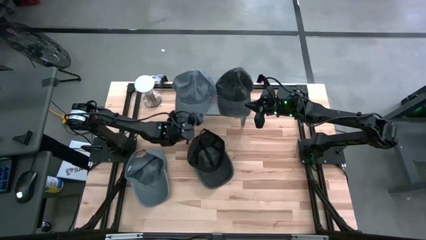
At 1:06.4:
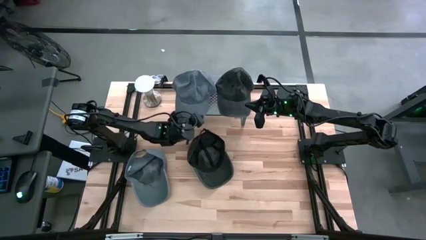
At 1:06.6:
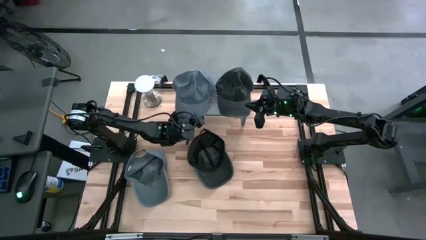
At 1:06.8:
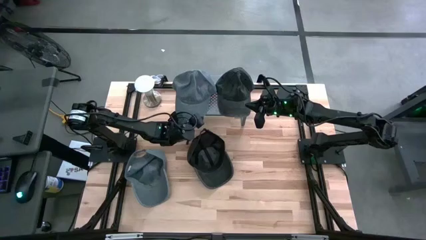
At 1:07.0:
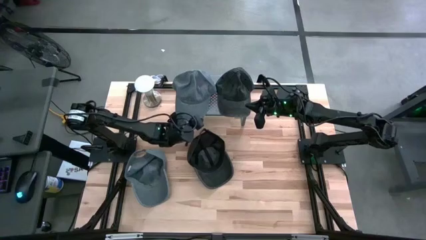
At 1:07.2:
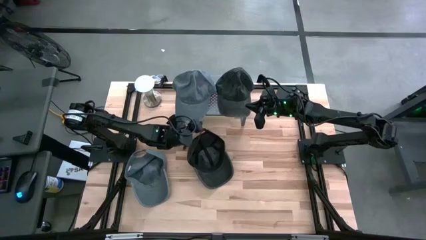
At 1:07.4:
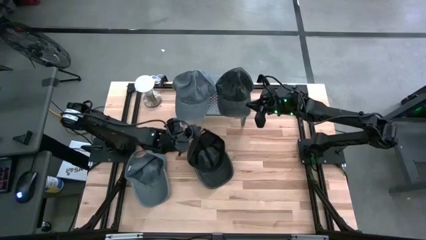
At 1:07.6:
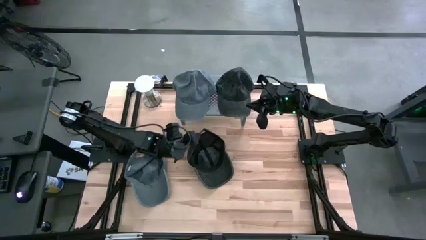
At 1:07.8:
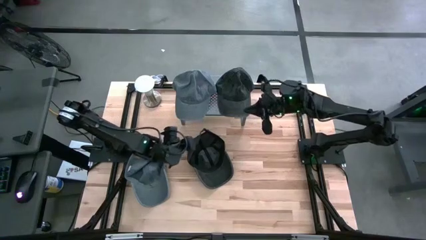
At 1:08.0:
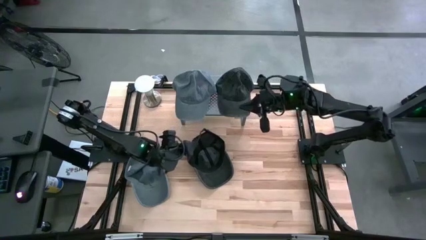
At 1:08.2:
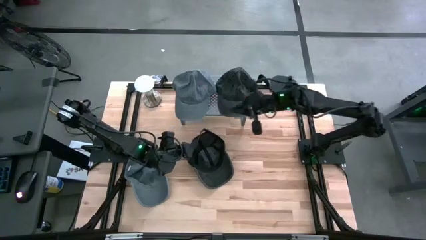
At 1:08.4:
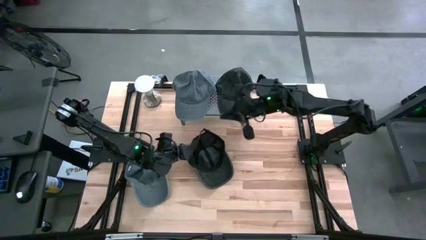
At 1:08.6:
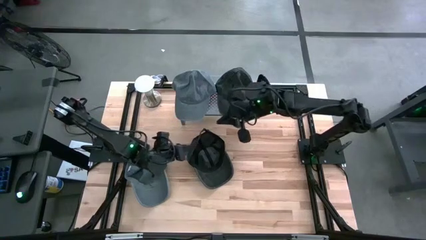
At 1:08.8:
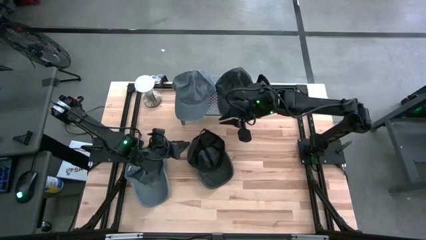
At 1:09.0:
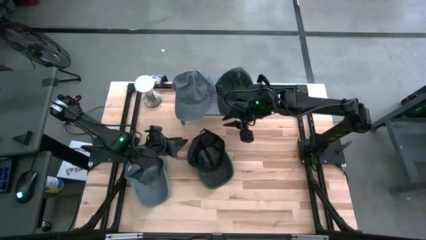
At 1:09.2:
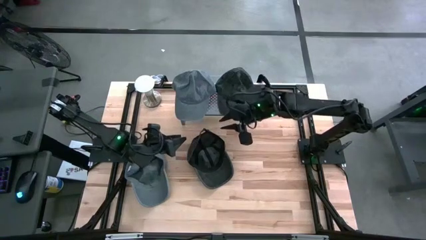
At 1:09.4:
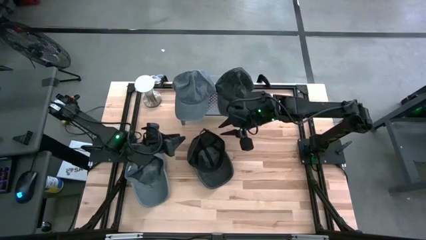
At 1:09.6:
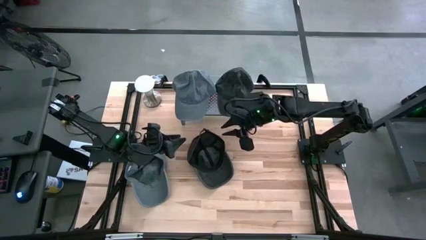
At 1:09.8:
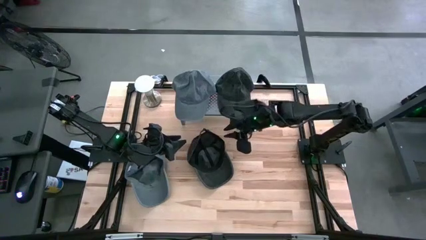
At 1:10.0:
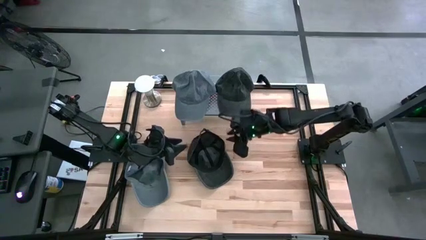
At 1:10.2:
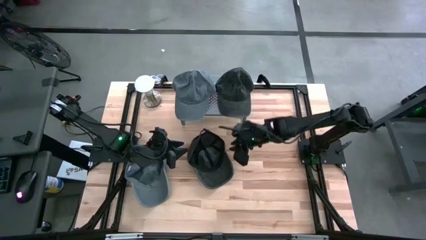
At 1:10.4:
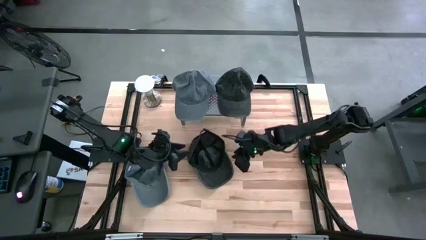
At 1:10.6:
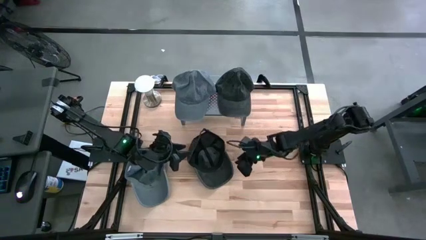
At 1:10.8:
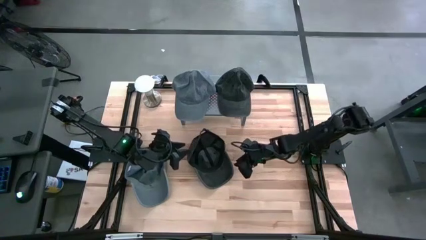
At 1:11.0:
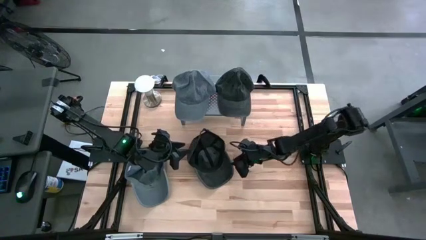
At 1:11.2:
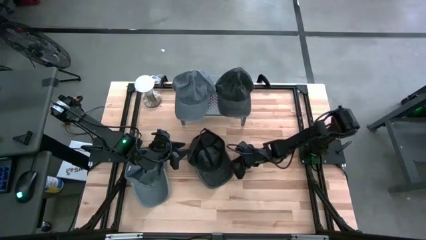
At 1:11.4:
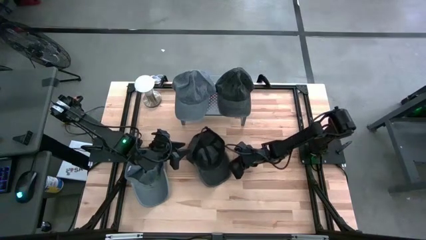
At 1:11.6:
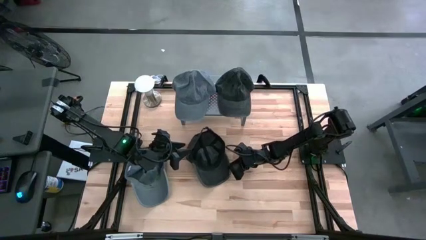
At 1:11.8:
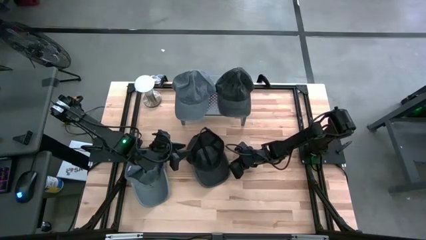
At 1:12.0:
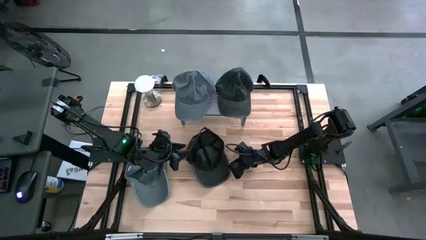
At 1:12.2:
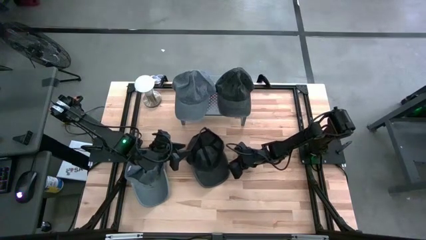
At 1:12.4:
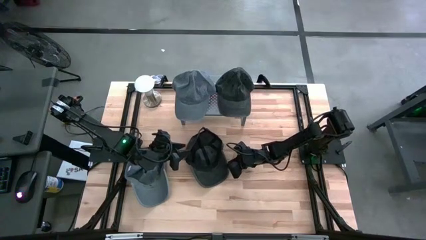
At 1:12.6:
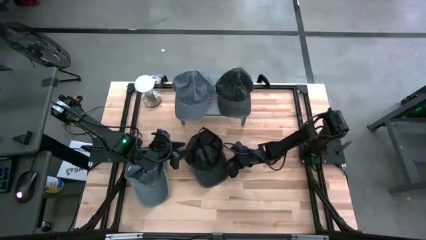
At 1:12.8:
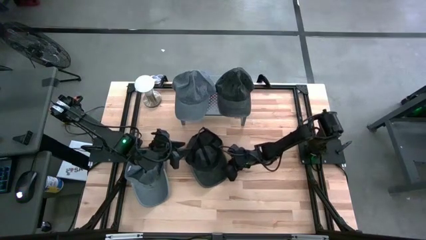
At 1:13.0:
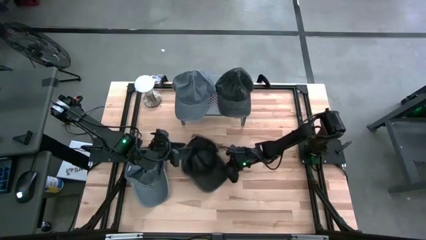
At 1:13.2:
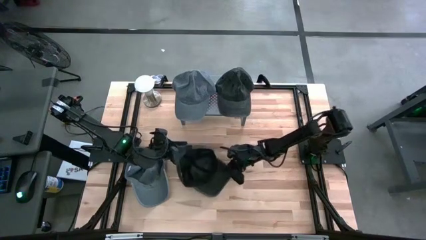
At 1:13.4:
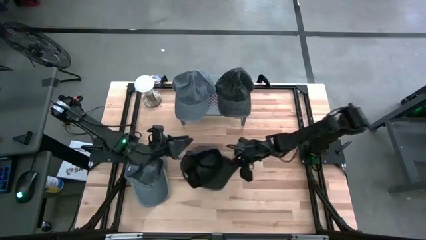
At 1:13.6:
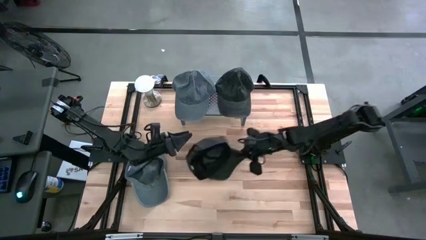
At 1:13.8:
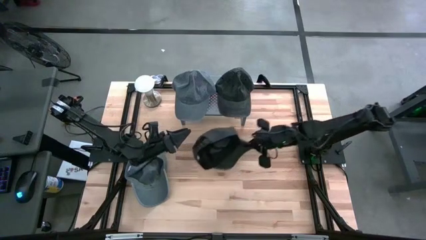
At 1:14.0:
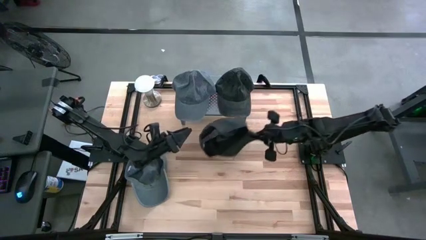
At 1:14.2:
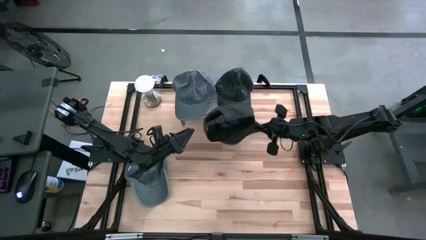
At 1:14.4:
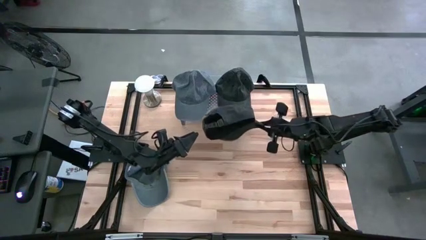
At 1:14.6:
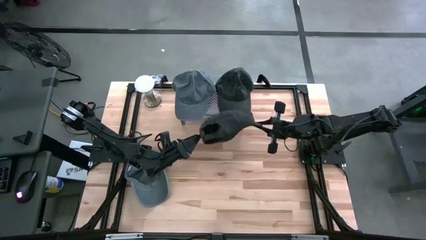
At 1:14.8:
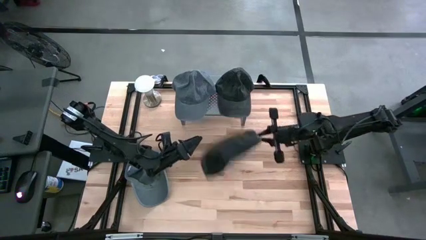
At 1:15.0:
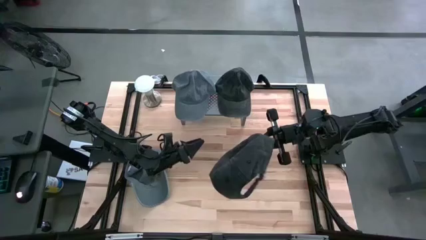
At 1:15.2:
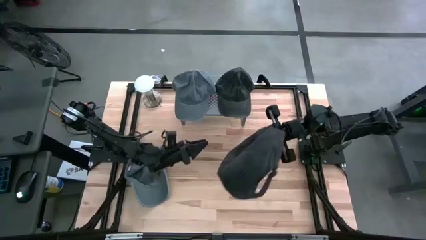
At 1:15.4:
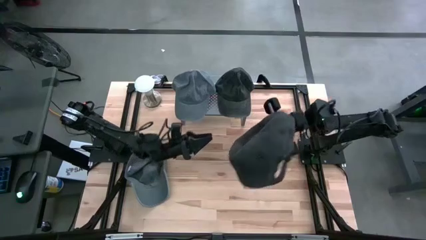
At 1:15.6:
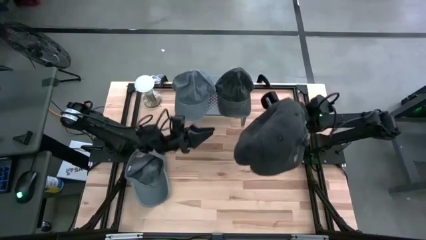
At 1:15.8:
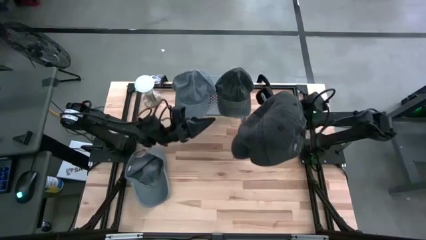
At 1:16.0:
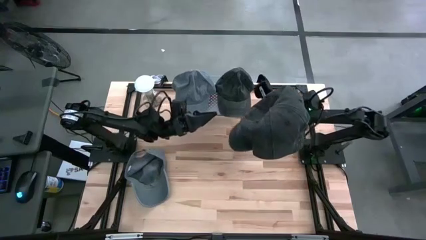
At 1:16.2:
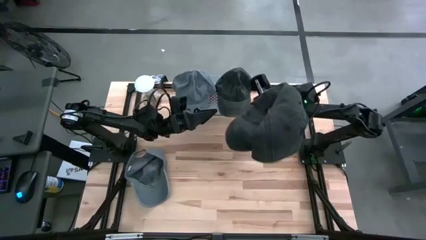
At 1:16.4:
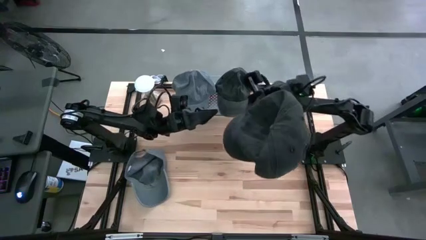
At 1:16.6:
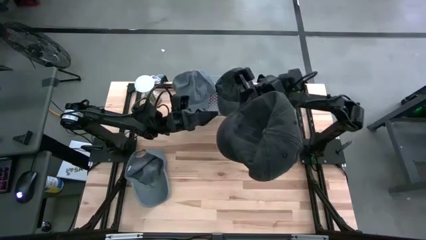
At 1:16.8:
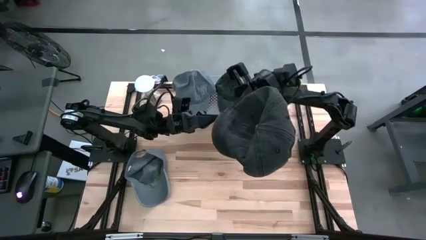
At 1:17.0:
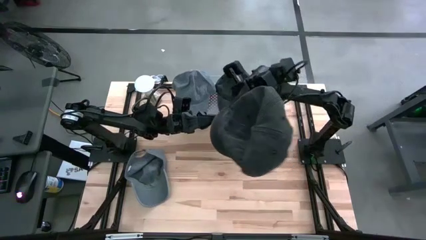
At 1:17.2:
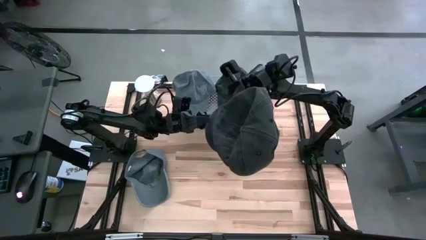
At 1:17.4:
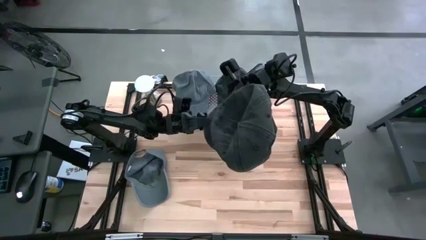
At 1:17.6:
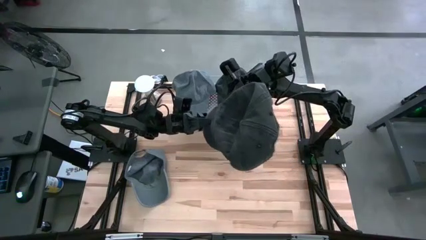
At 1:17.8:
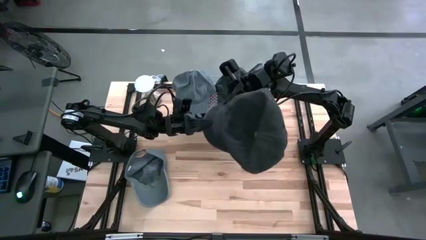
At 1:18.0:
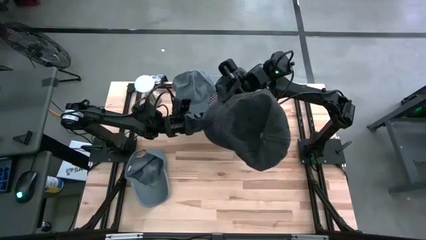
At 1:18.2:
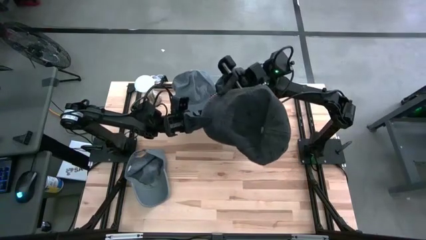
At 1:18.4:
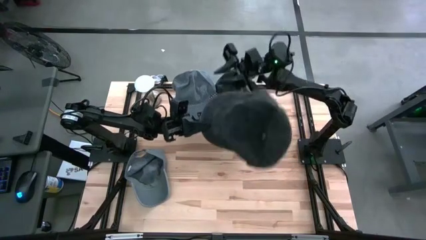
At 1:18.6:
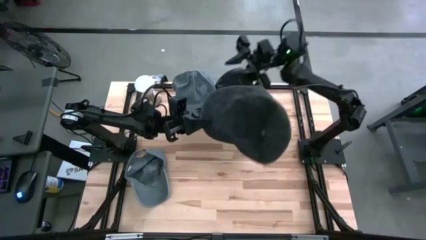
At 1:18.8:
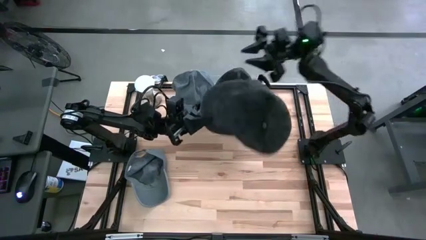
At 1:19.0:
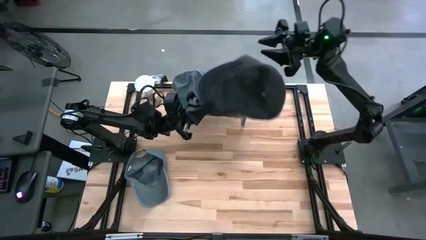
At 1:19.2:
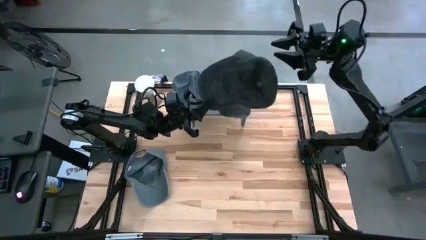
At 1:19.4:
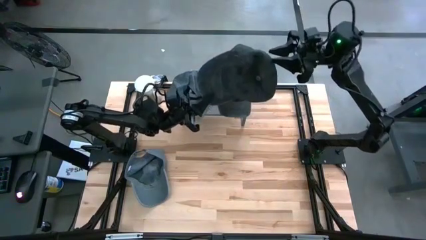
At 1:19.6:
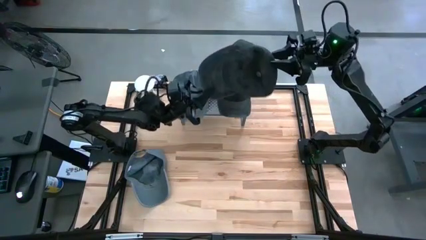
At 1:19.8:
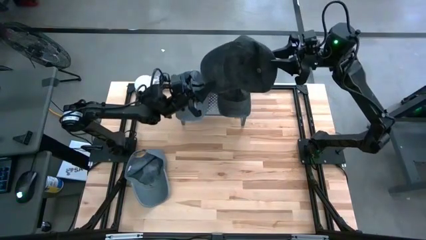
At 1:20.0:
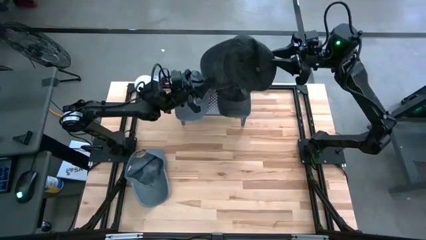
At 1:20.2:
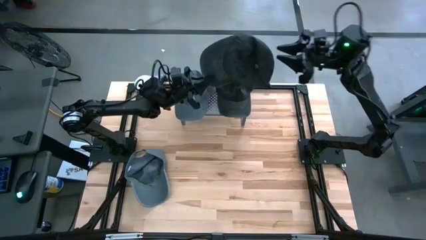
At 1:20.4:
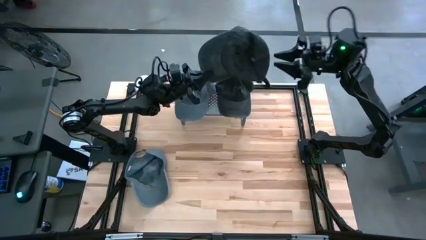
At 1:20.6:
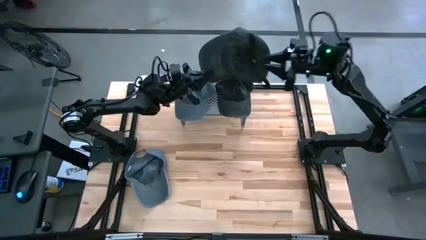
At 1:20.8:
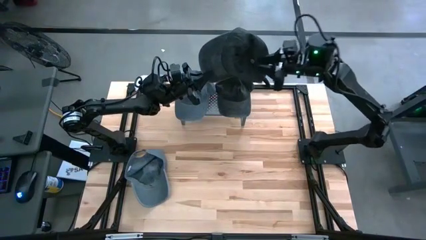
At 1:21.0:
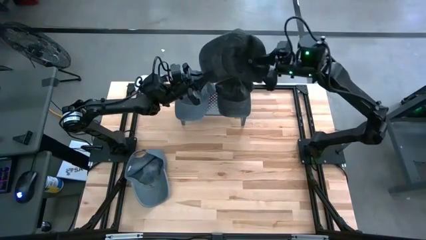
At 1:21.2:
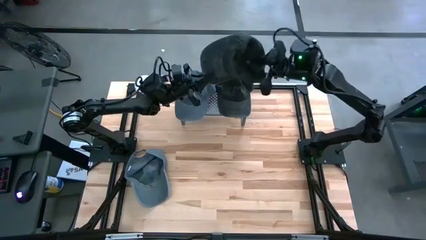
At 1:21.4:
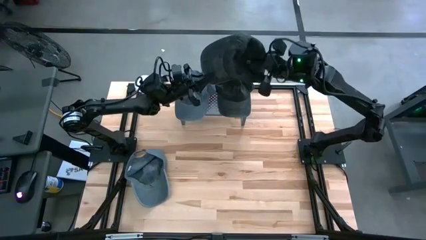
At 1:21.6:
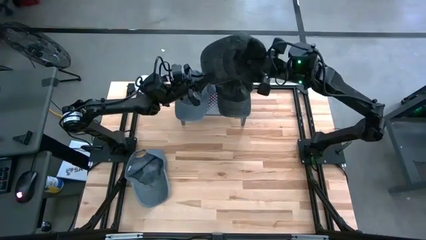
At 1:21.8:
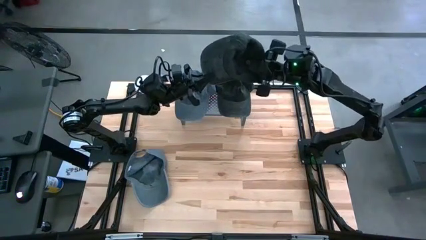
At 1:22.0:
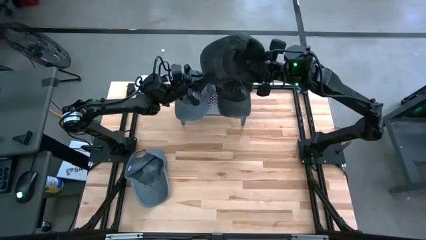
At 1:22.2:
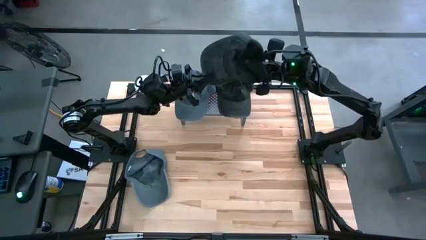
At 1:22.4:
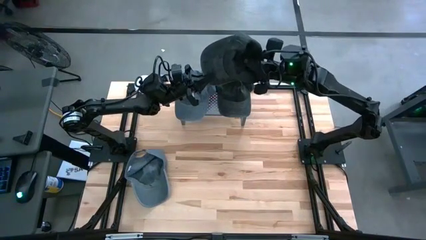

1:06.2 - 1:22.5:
Task: Pick & Place hat
Stack the black cap on top of the other black cap on the shelf
